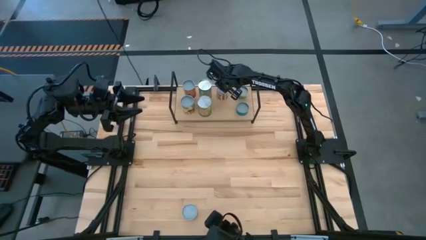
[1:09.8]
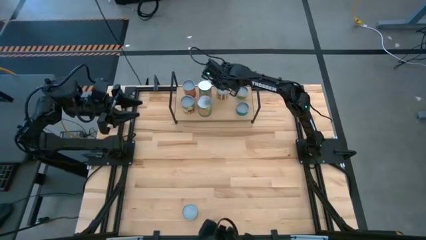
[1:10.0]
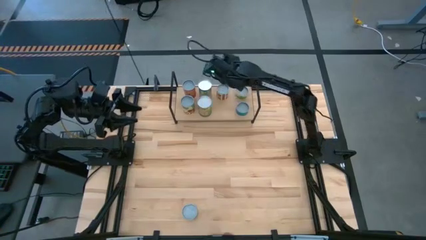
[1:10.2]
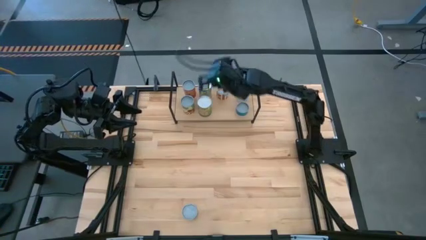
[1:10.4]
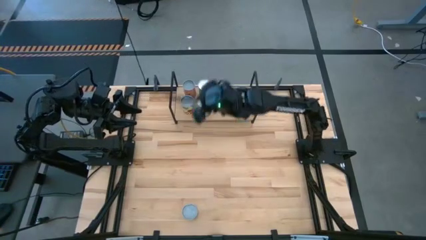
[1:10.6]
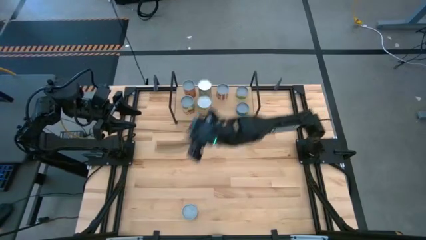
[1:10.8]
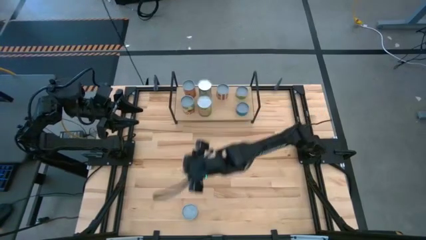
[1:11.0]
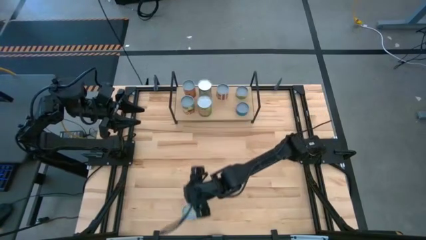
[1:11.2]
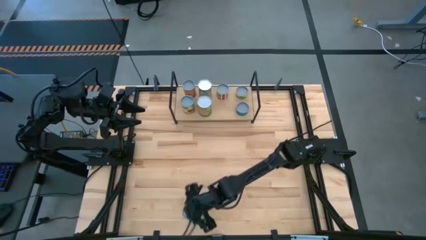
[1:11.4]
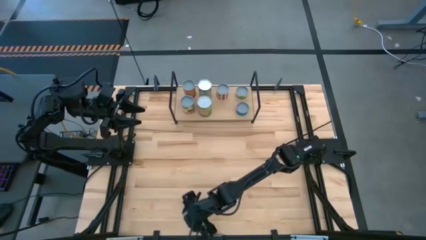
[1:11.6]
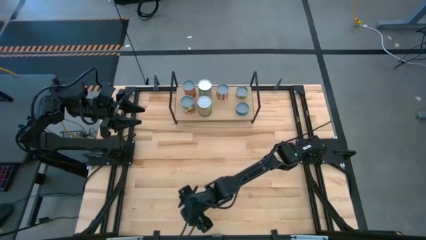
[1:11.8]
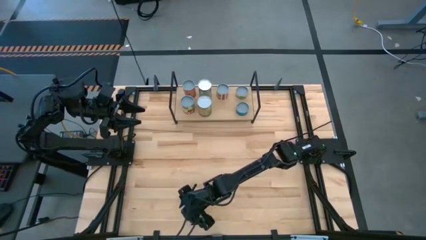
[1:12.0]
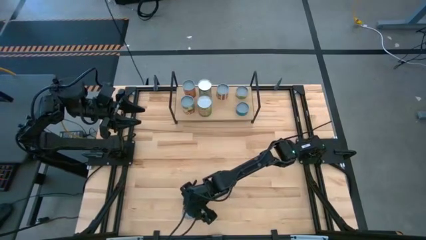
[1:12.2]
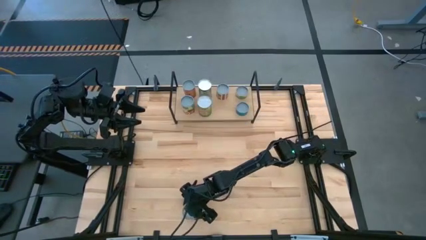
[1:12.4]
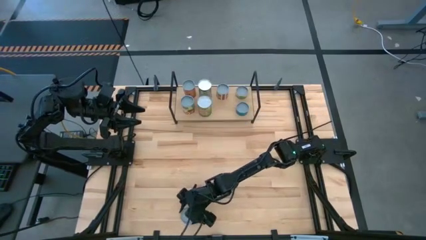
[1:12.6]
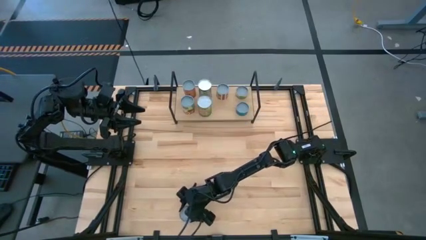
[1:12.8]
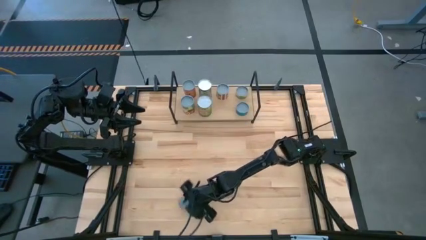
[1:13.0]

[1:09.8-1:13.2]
Task: Pick and place cans onto a shelf
Put the canned sliced peaches on the shelf

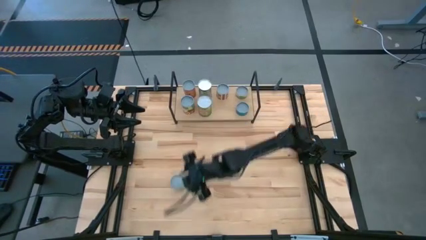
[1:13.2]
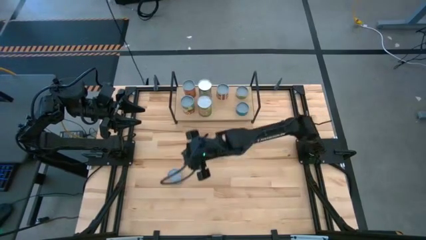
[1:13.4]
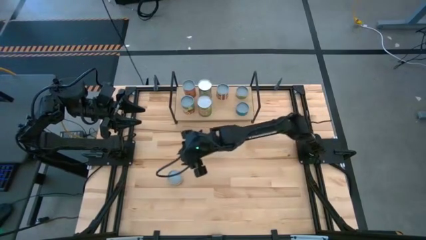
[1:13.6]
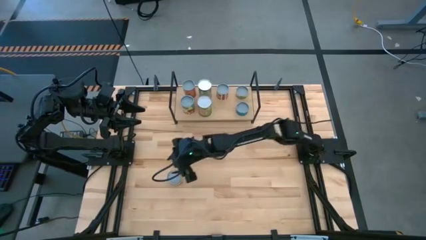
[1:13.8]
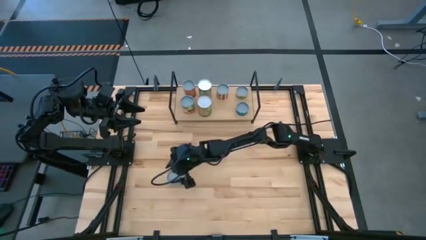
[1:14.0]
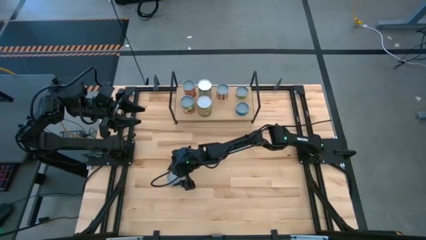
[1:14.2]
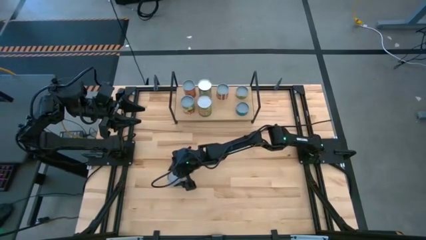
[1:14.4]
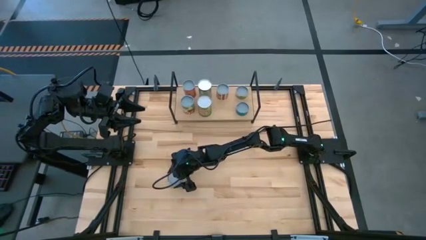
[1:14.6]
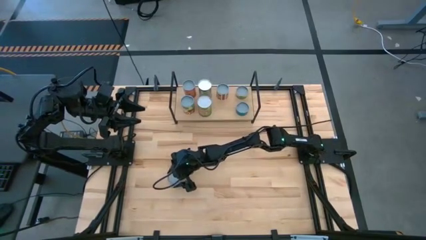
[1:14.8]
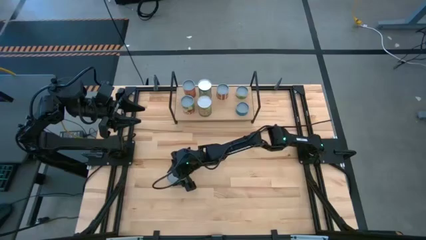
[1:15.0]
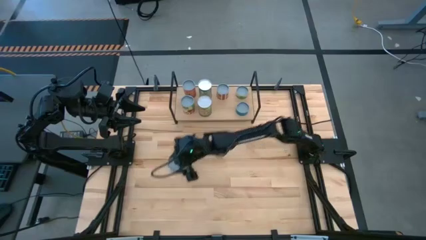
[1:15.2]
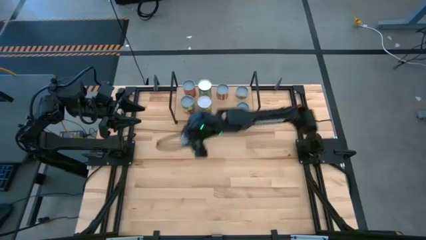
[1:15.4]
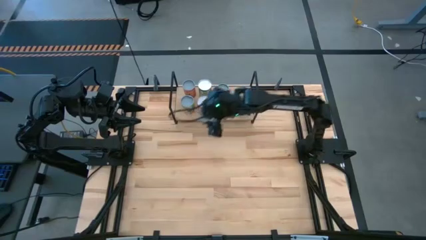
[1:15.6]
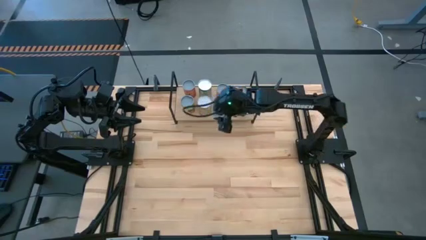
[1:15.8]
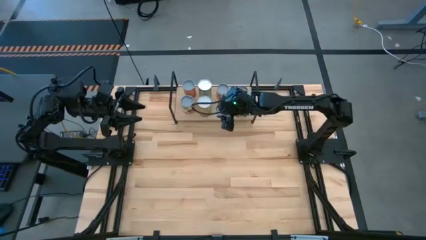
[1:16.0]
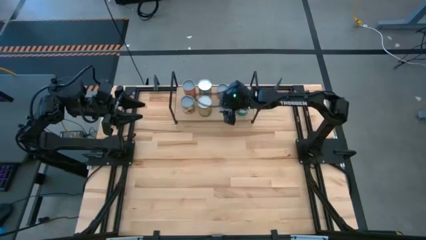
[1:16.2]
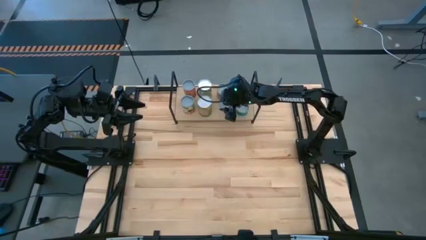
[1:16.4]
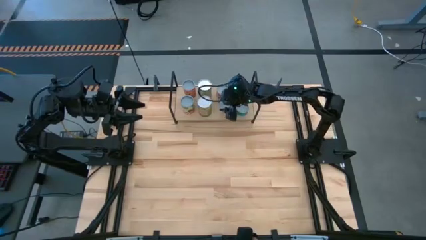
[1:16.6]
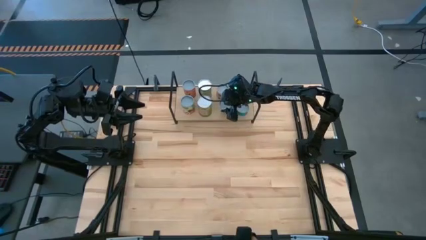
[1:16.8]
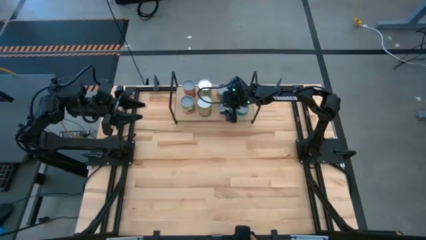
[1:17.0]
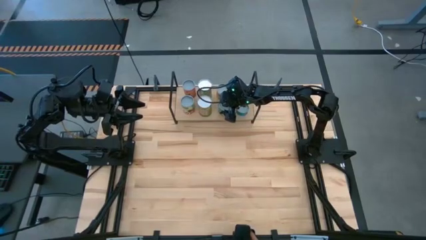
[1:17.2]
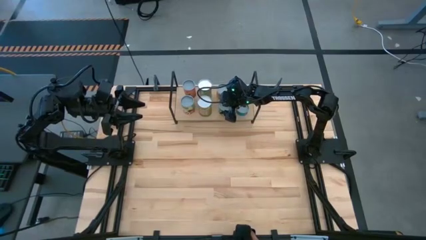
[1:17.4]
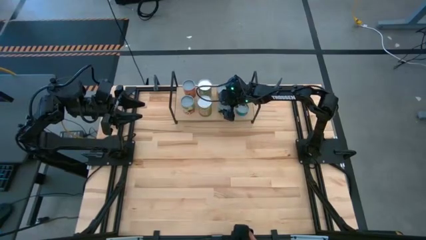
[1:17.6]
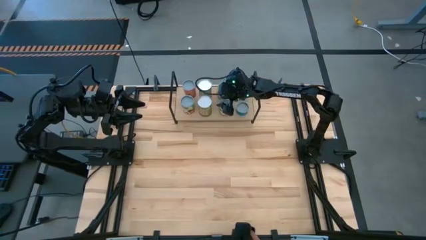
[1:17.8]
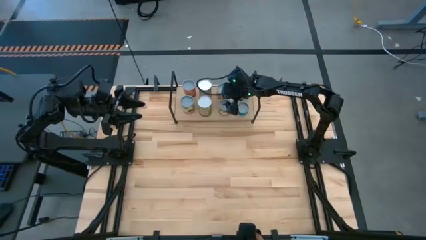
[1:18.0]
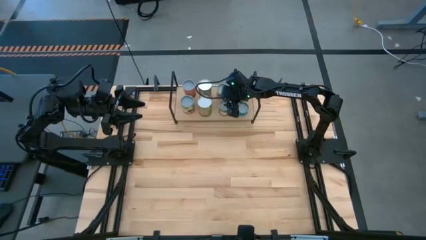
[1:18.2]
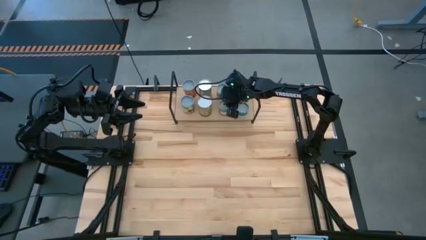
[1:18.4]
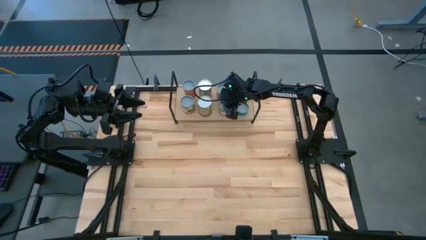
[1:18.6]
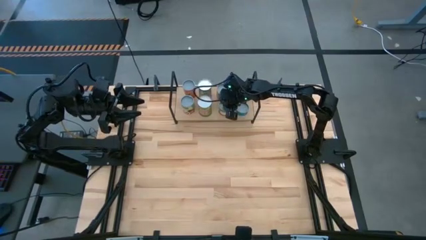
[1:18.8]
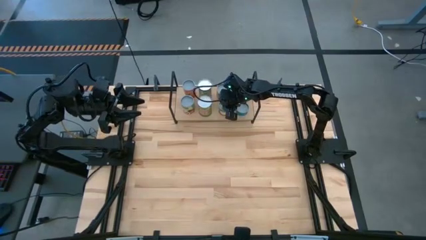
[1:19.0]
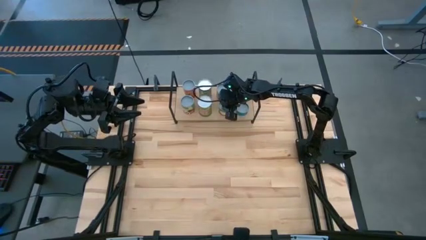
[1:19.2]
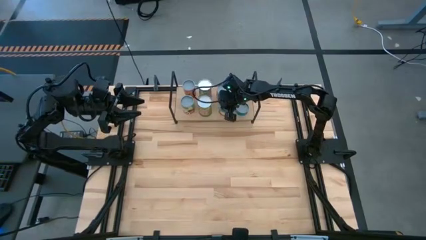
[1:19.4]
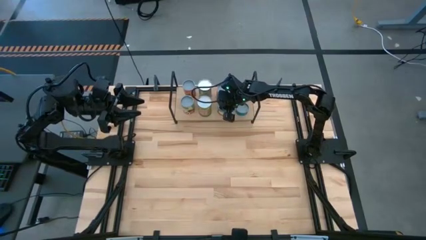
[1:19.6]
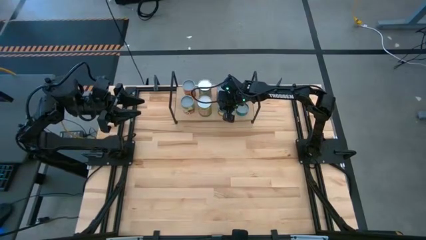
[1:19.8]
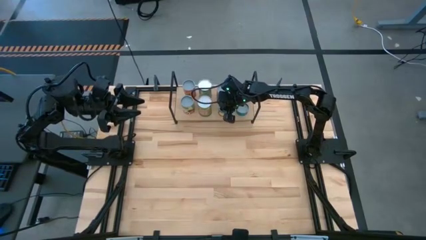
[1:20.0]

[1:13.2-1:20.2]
Put the canned sliced peaches on the shelf

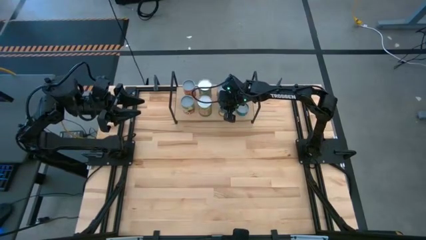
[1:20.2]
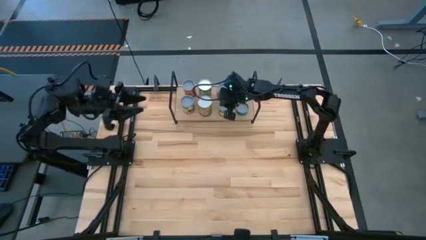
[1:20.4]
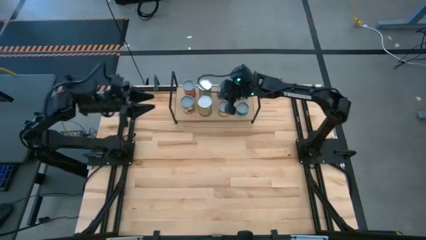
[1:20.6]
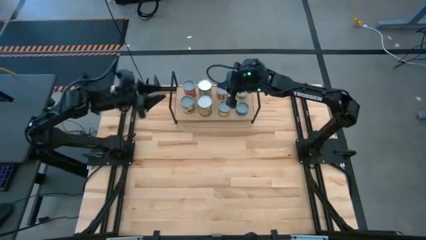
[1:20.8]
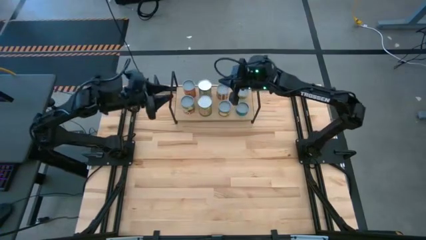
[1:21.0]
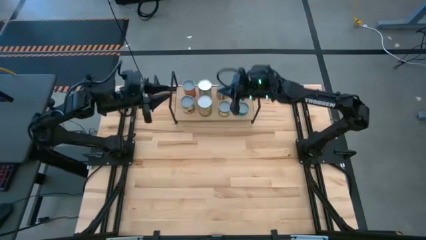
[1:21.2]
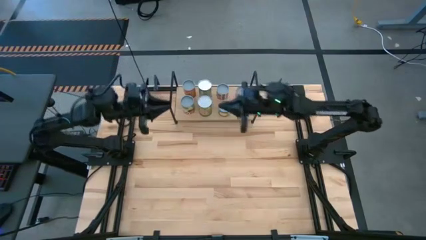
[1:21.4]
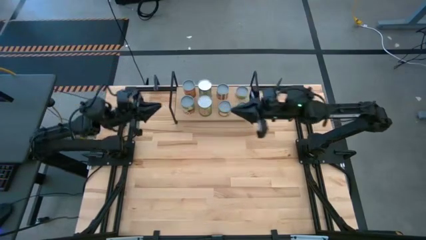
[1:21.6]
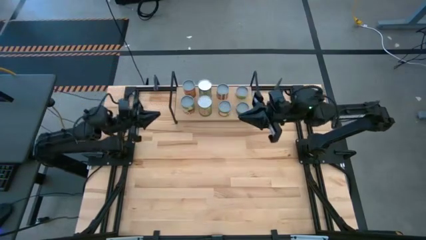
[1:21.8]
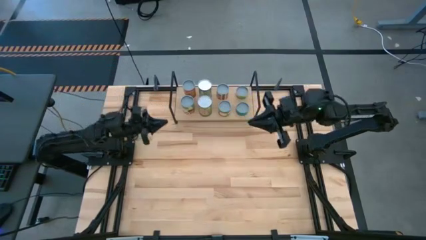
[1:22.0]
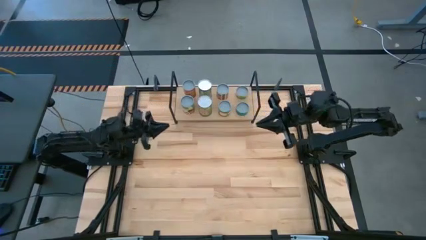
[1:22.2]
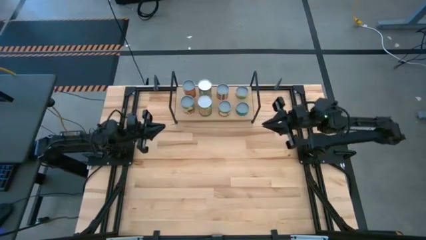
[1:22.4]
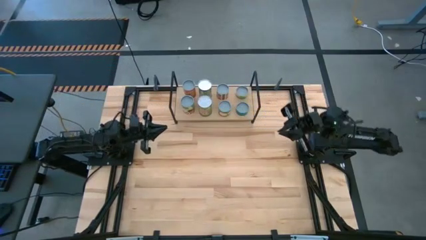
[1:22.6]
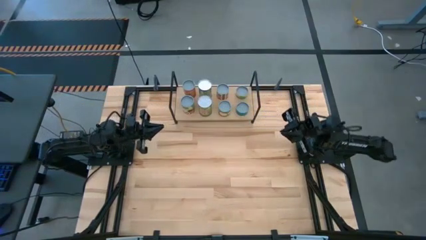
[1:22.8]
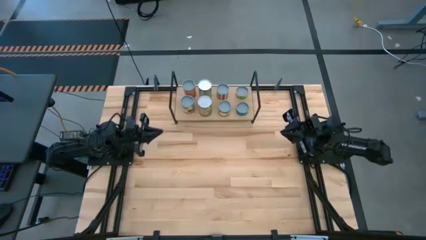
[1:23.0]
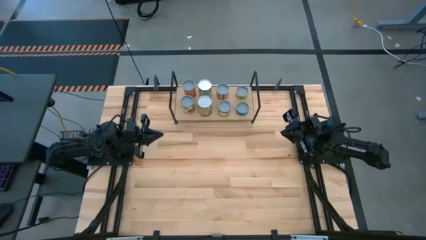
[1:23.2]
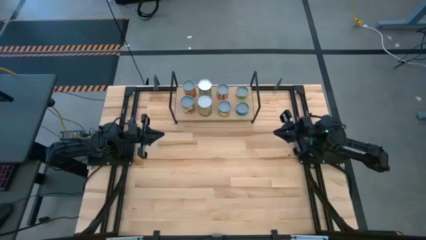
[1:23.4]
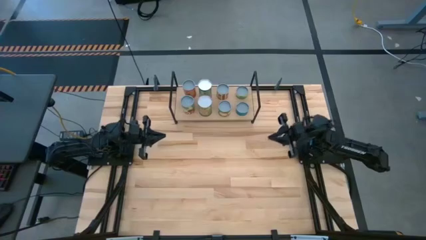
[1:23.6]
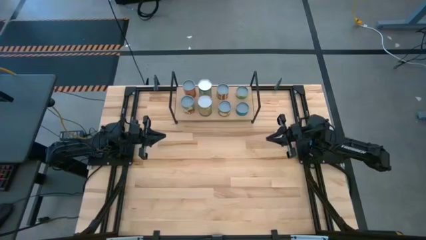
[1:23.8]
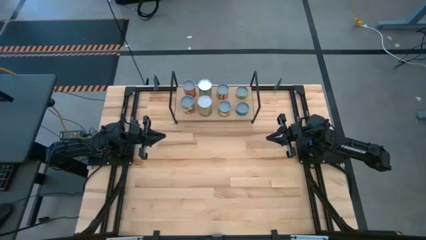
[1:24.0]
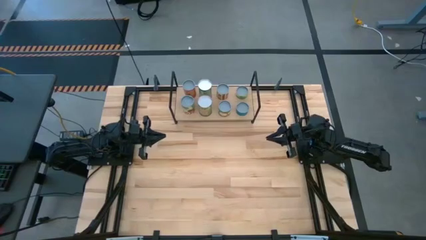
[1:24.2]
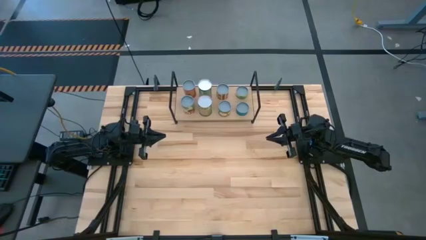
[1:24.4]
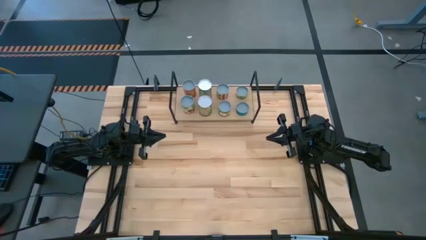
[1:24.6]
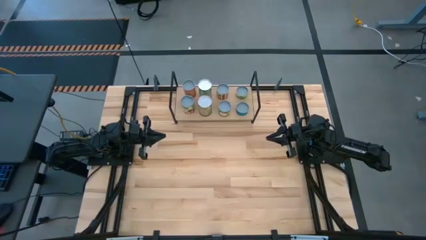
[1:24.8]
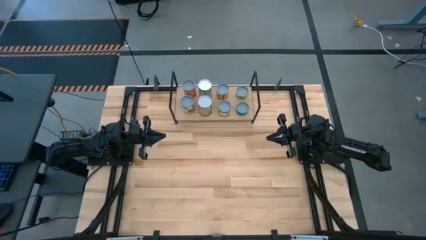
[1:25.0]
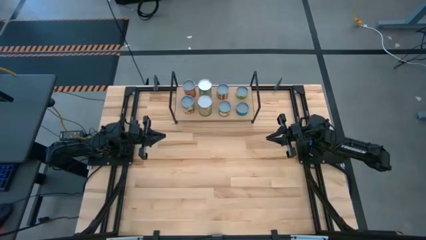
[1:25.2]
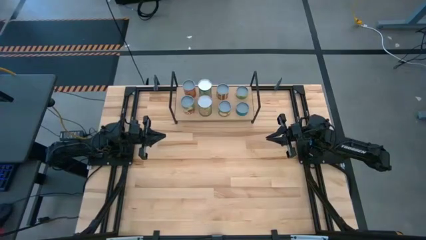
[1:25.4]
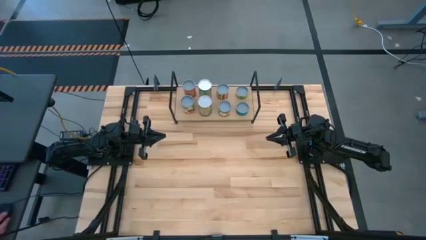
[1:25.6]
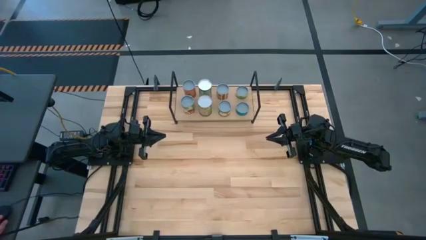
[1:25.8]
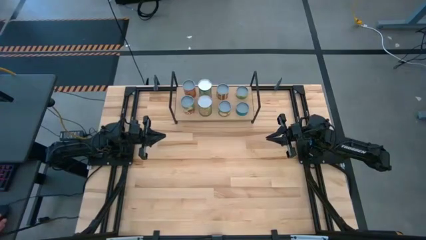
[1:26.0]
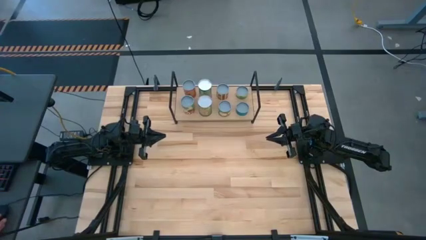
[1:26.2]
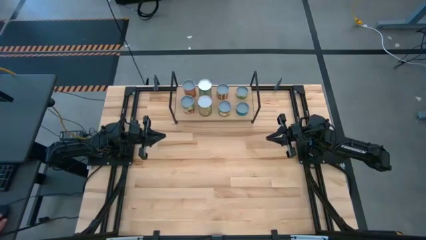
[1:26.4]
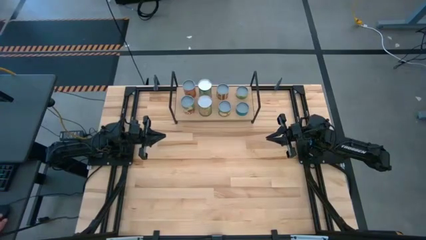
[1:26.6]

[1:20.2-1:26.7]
Return to Home Position
